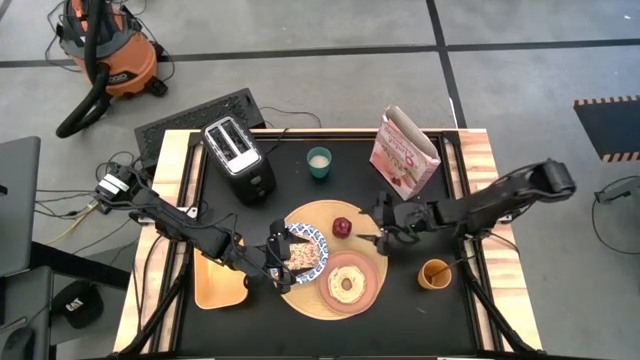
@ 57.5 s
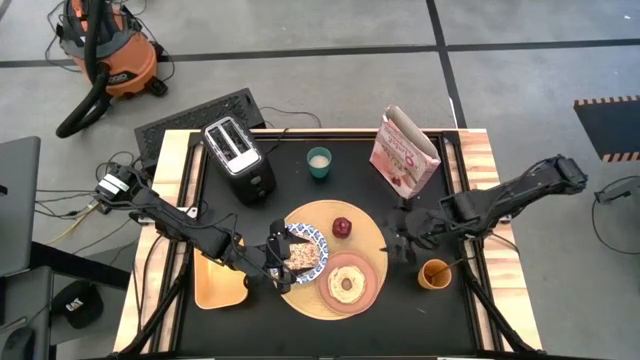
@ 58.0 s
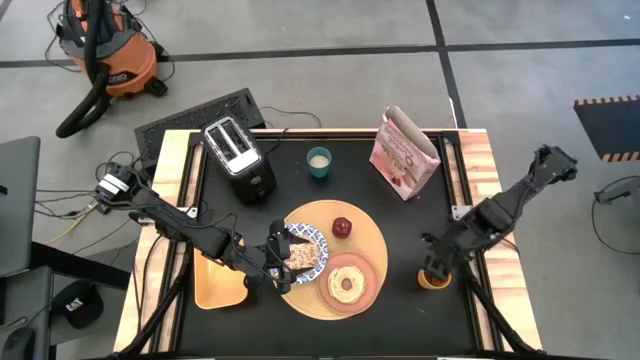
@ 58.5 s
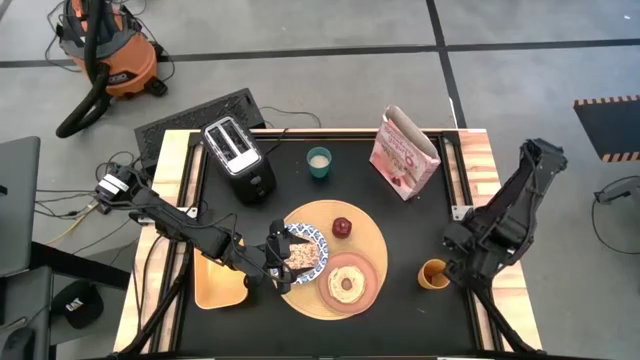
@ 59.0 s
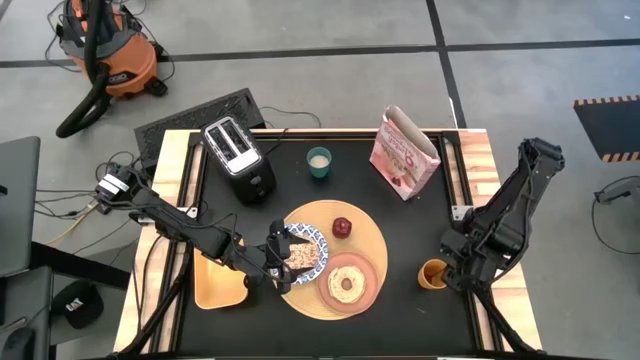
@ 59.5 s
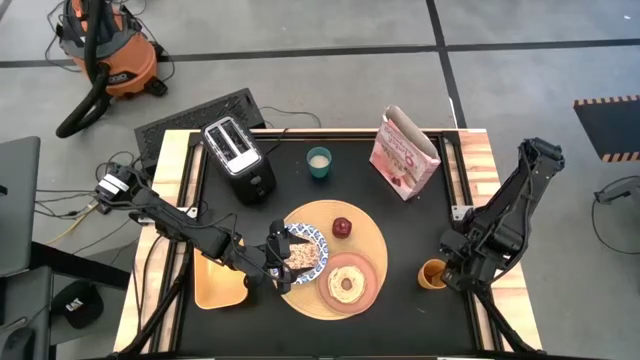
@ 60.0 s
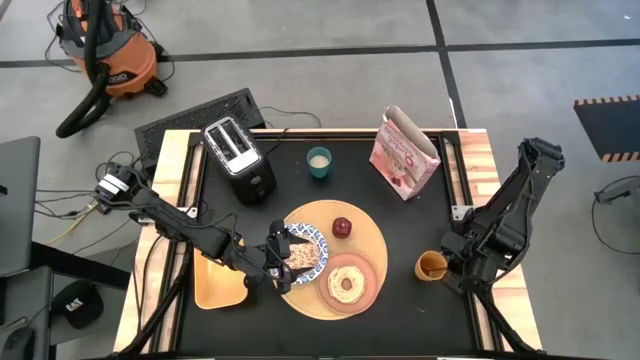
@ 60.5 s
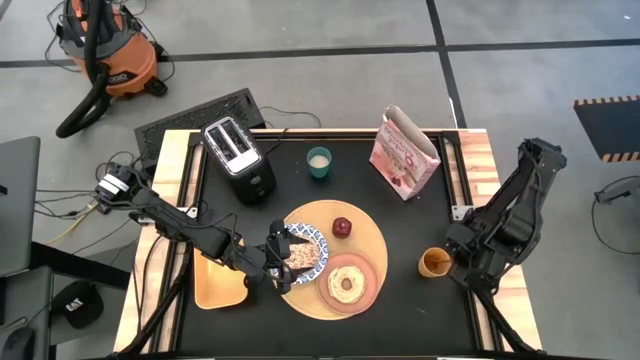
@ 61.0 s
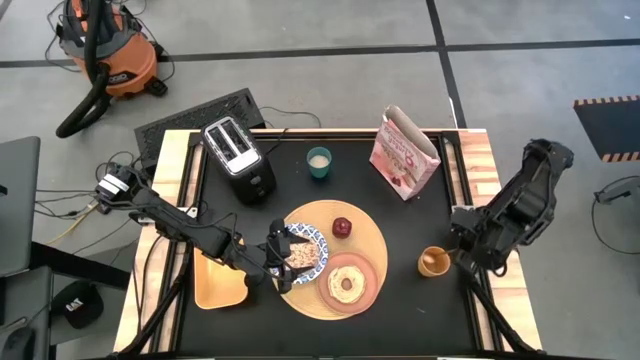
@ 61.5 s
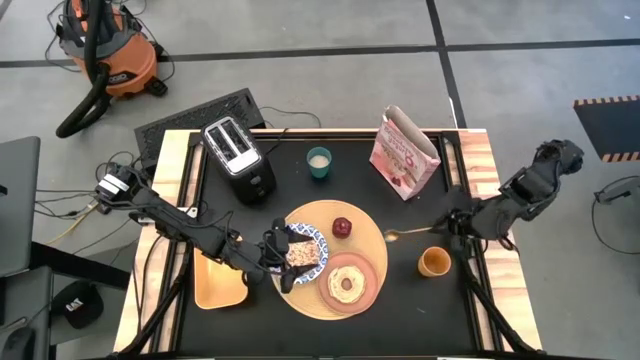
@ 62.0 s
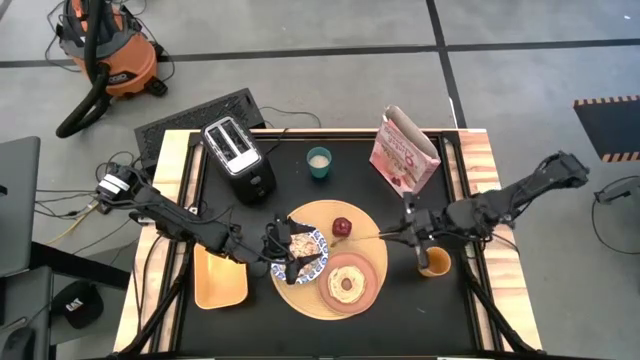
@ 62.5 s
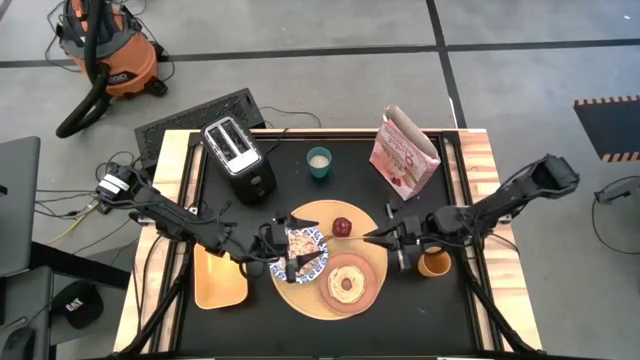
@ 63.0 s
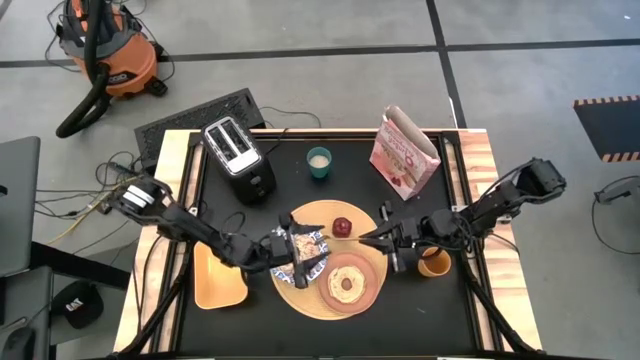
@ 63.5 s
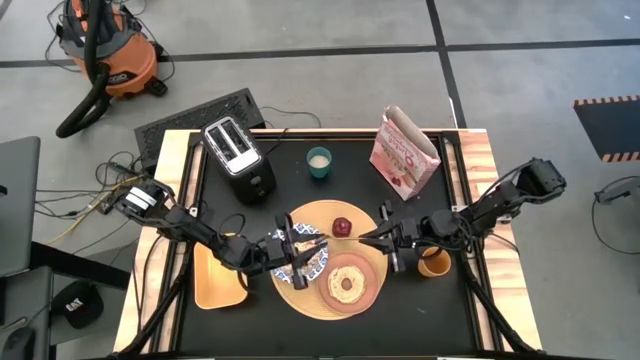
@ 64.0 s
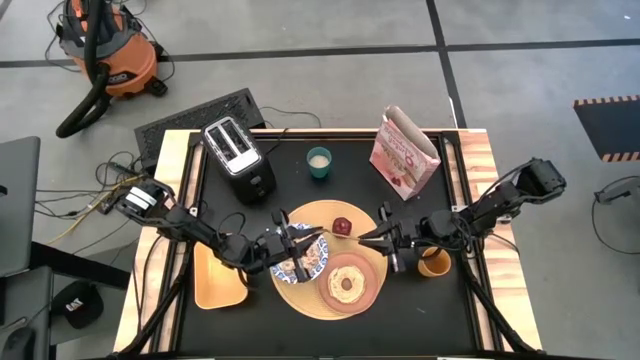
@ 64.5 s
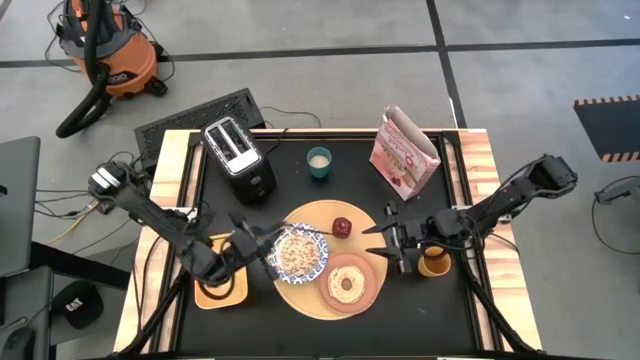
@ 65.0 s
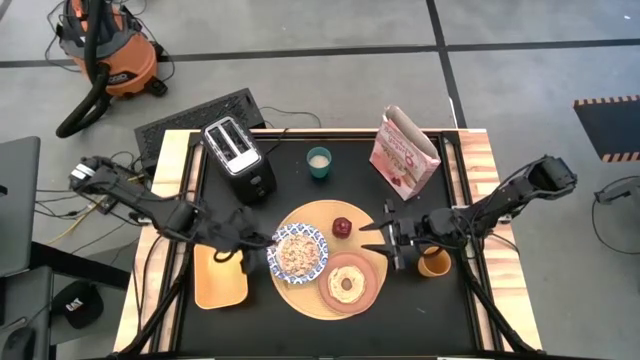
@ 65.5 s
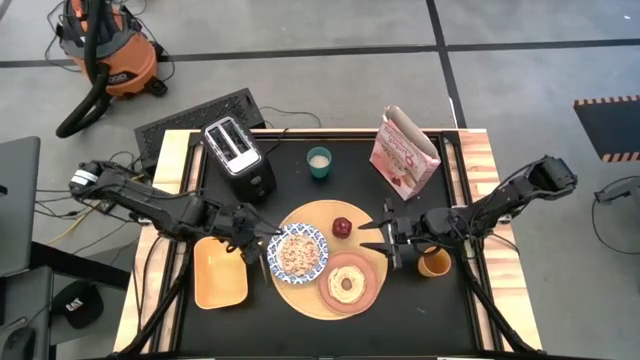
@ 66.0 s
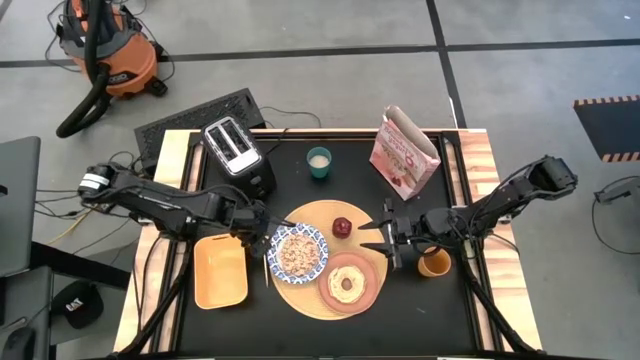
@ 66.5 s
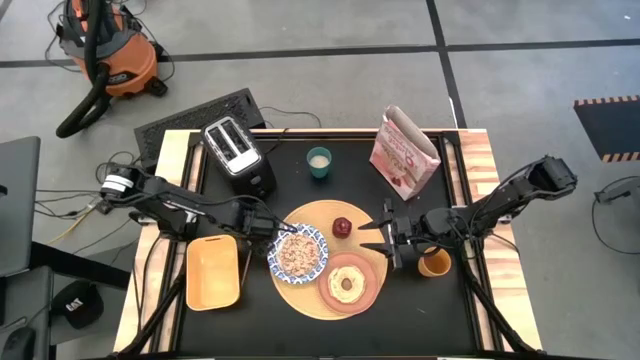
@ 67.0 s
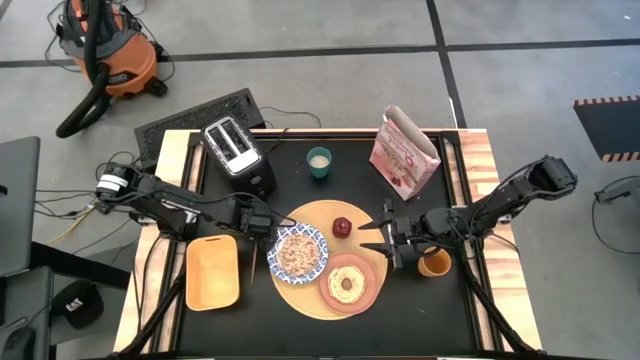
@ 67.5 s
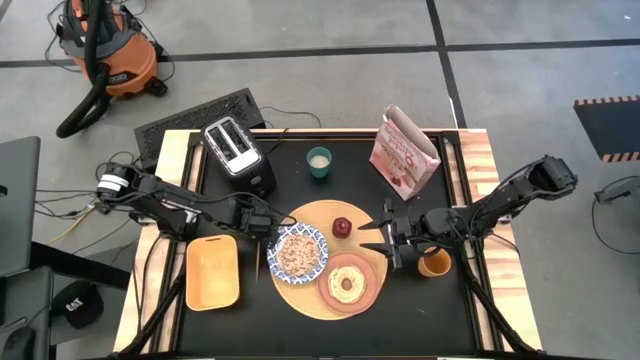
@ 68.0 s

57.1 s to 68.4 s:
Task: Arrange a breakfast setting
Put the spoon on the table to the left of the bowl

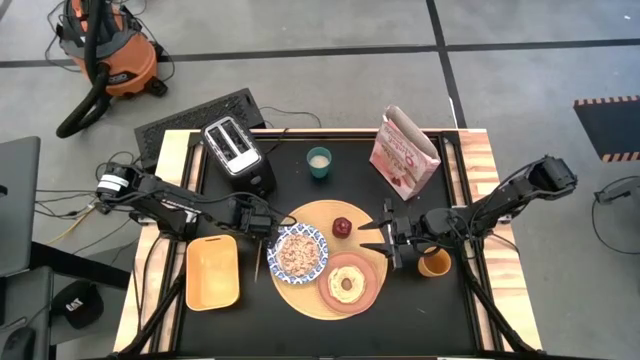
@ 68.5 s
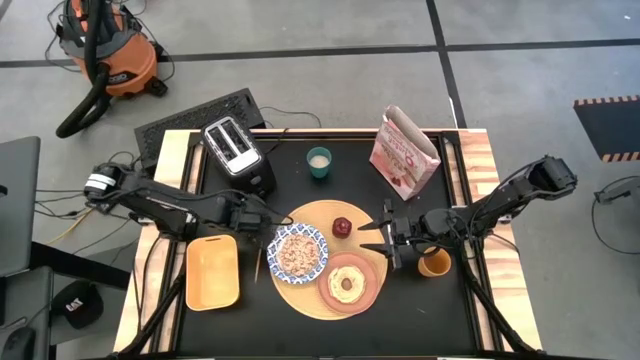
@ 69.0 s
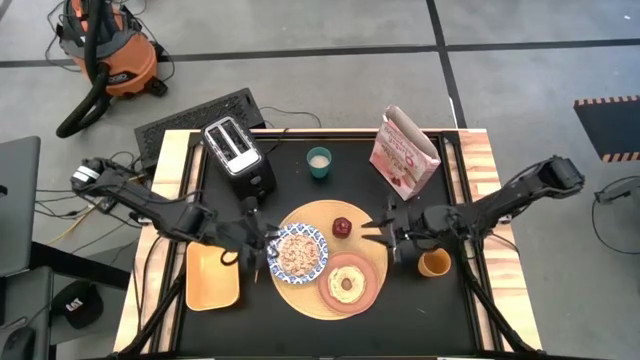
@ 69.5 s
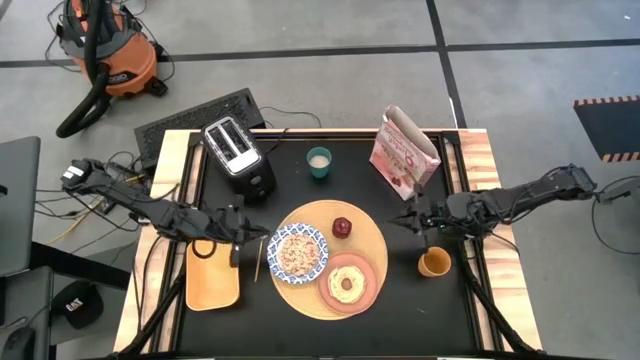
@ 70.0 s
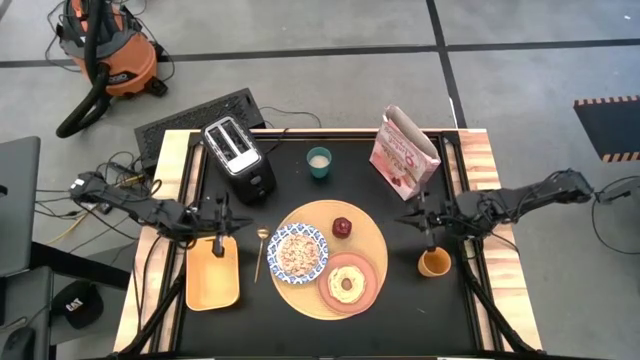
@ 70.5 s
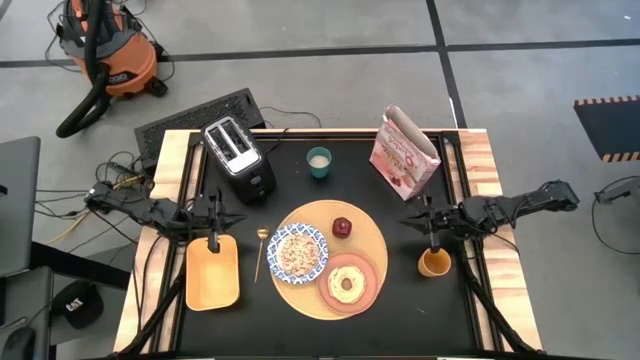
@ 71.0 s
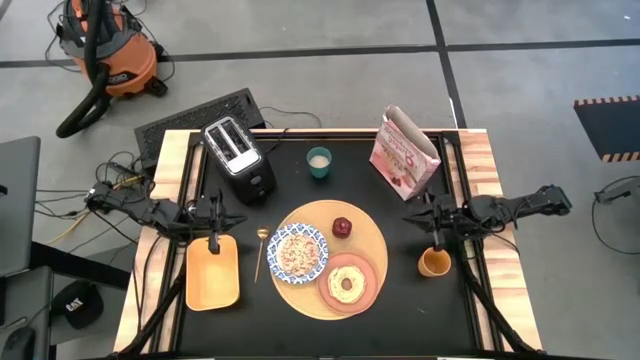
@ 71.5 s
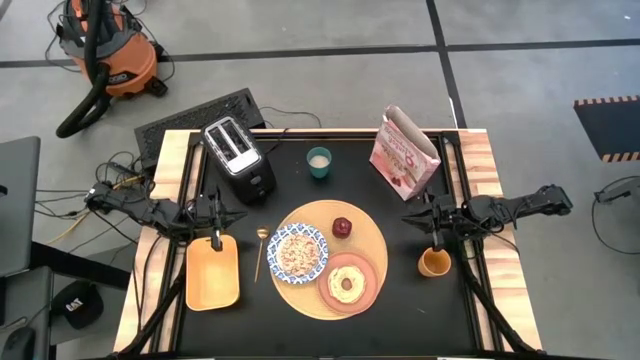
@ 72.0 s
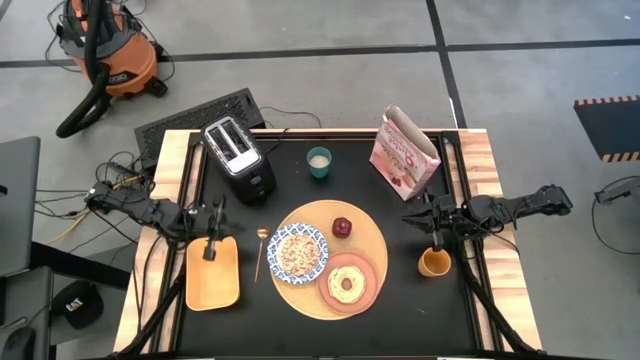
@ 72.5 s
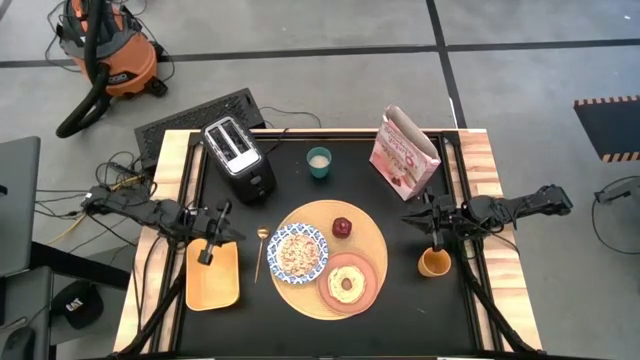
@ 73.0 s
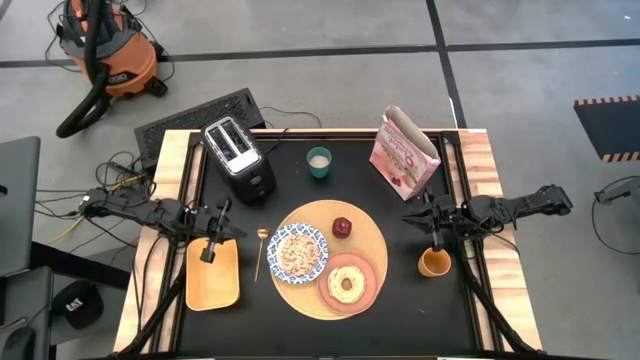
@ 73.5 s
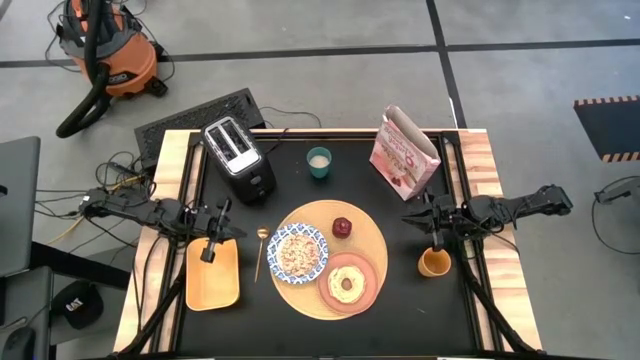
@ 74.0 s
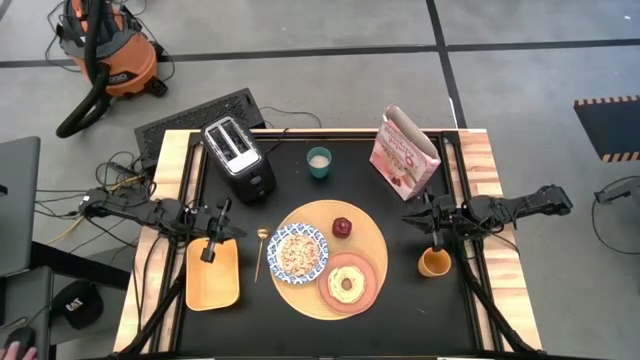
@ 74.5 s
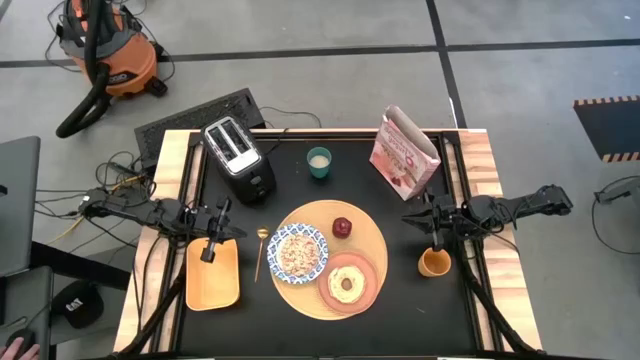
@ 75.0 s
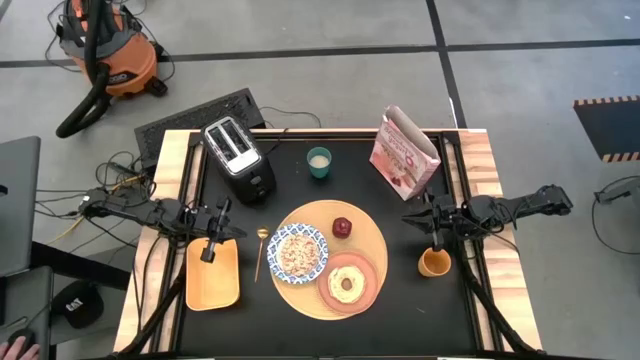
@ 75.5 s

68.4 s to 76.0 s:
Return to Home Position

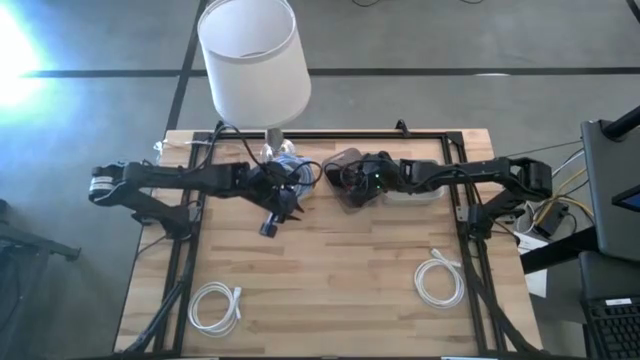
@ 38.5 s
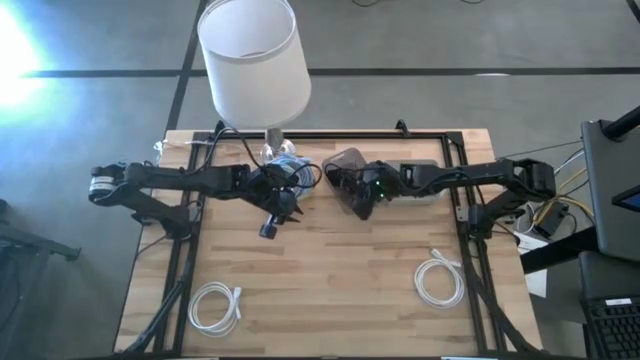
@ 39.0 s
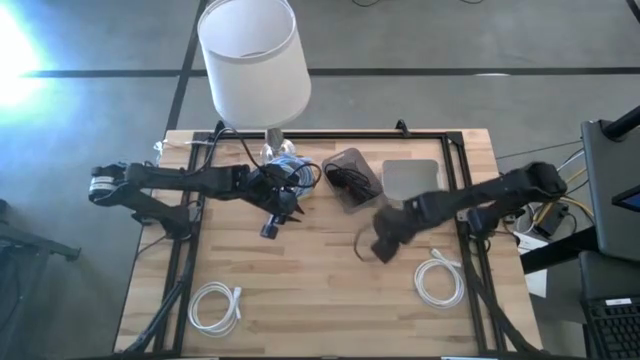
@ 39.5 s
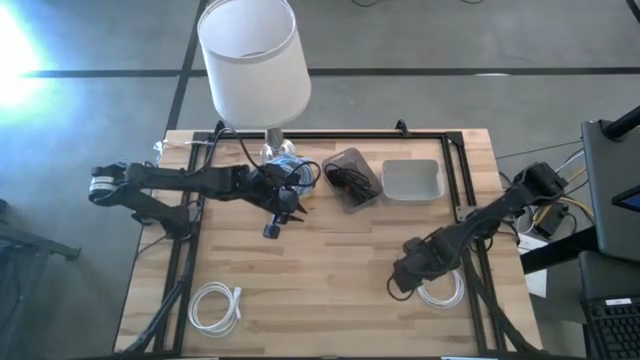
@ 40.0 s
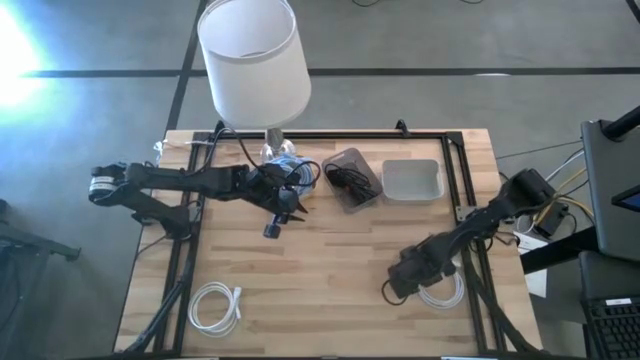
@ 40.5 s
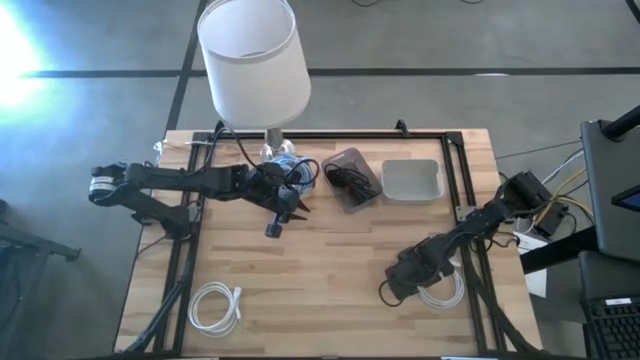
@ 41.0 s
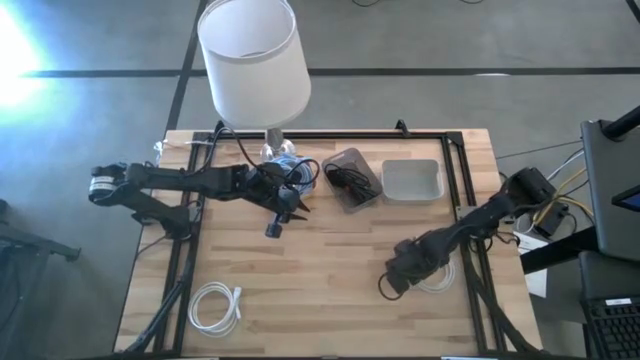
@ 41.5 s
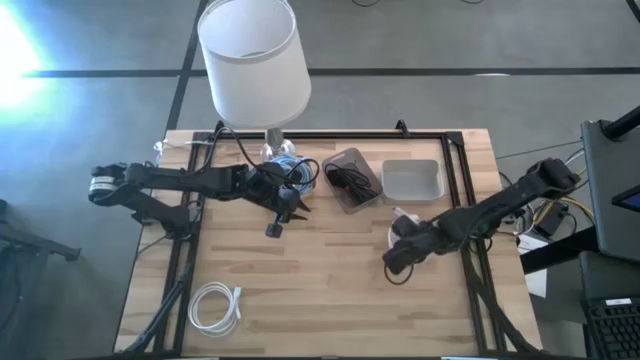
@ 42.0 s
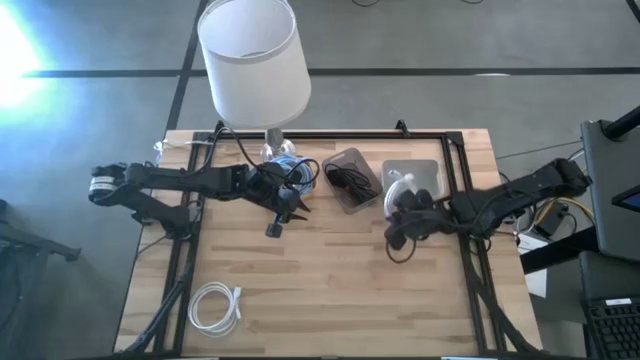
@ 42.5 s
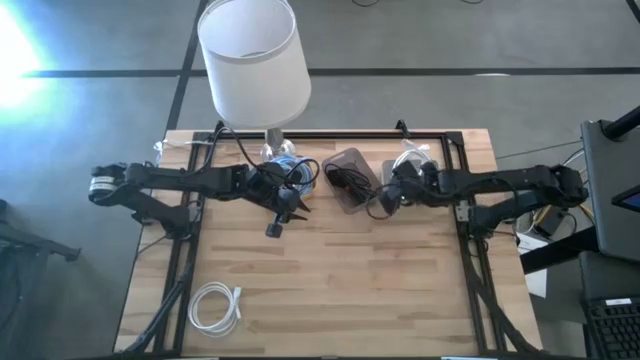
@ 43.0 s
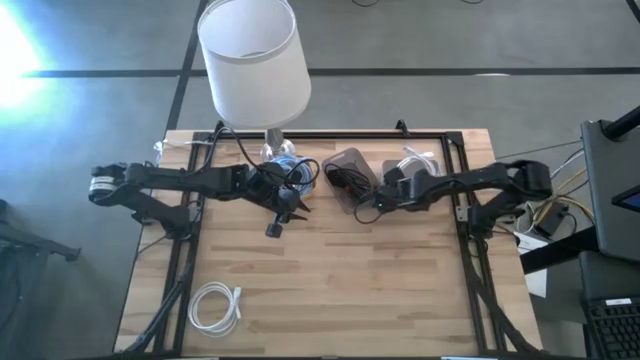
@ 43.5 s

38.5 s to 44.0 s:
Task: Pick & Place USB Port
Put the right white charger cable into the gray bin
